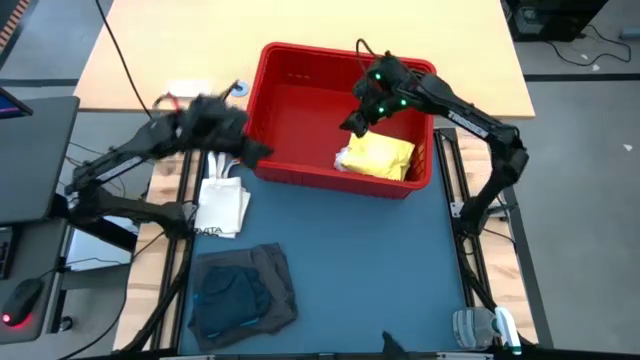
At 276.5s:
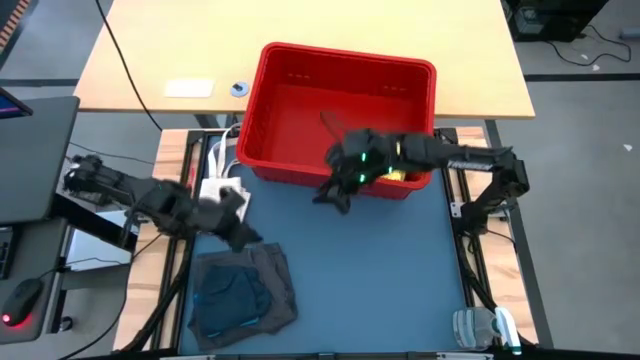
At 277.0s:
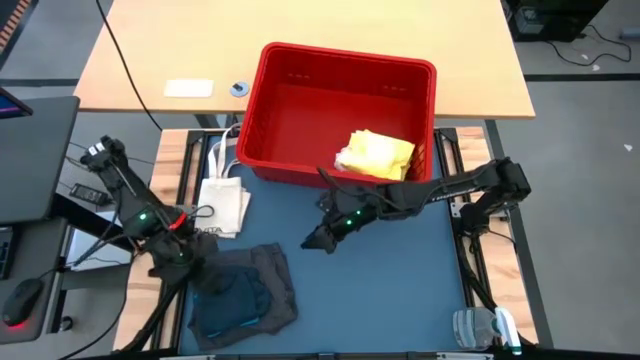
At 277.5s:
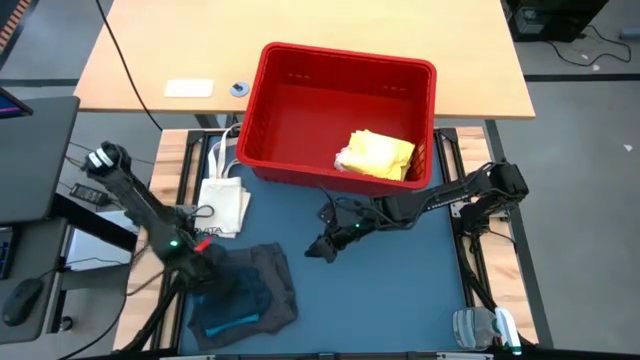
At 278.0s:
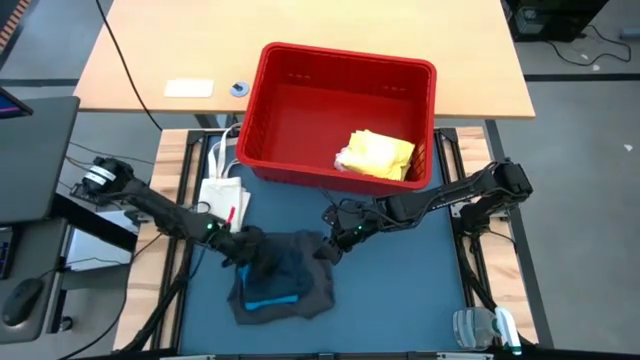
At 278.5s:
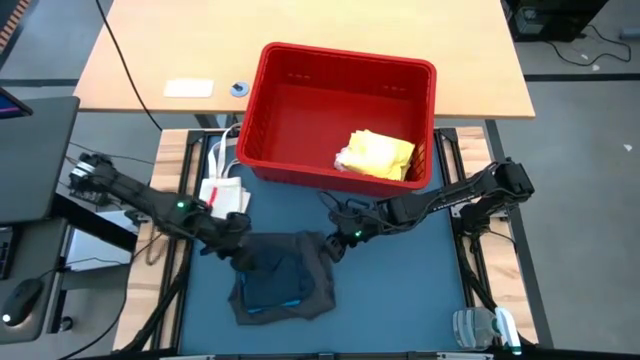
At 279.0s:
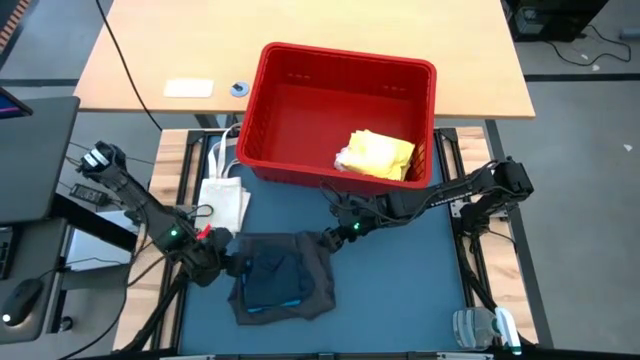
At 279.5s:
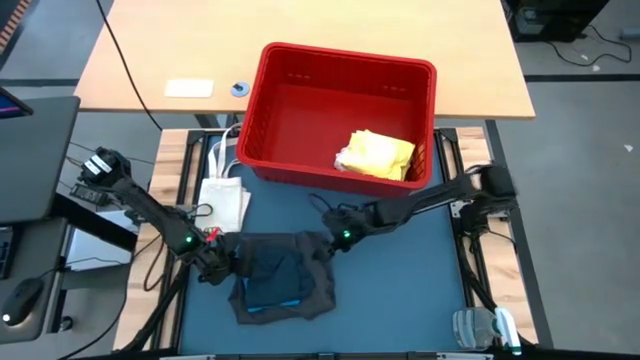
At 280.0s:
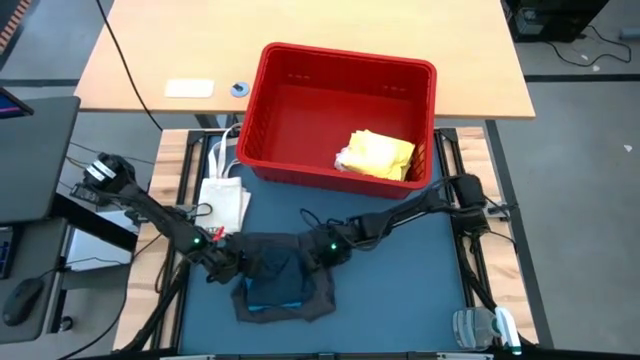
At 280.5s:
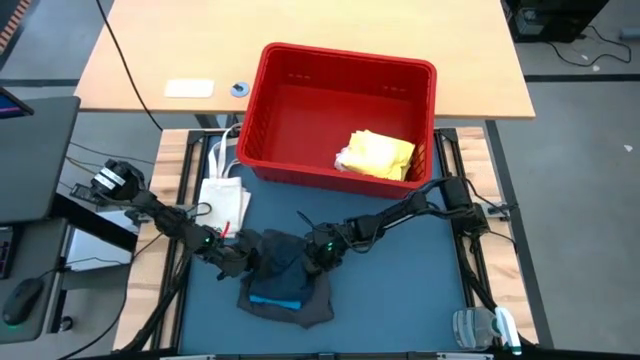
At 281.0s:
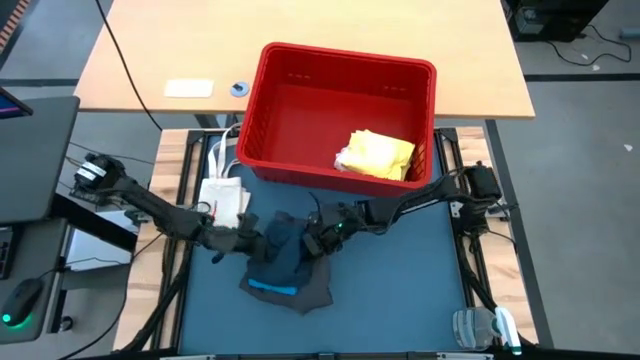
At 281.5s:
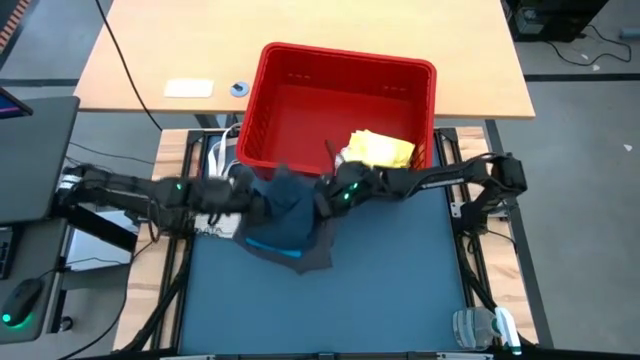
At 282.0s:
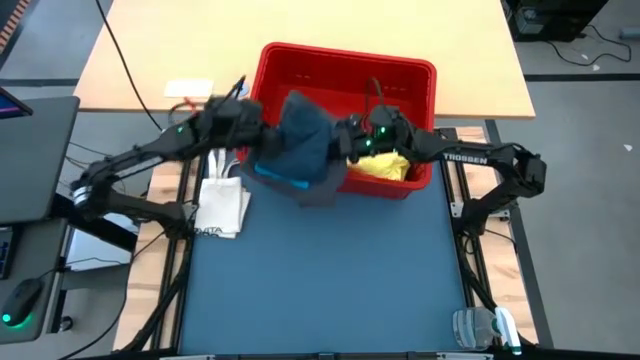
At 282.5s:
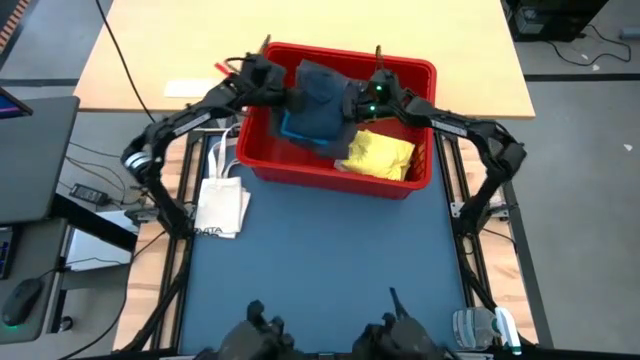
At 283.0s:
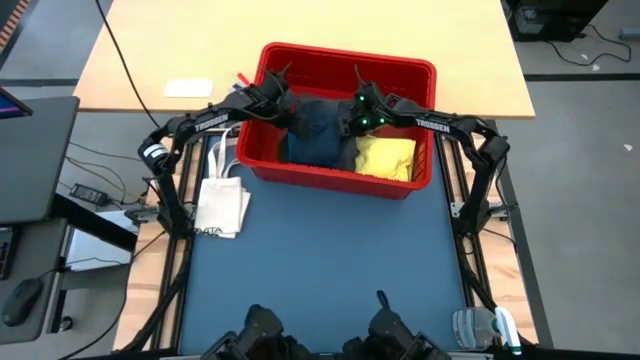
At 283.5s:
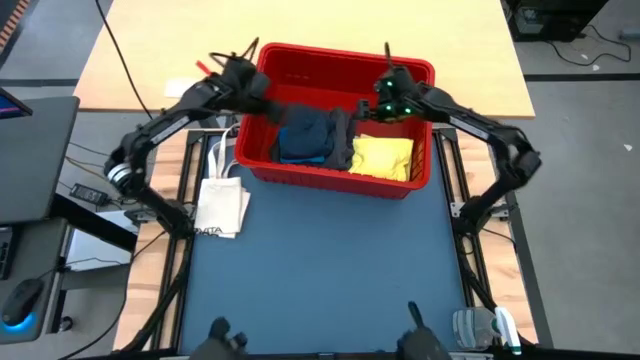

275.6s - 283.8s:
Task: Fold laundry
Put the folded shorts into the red bin

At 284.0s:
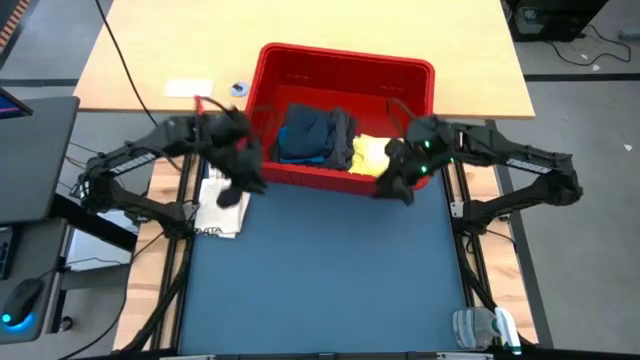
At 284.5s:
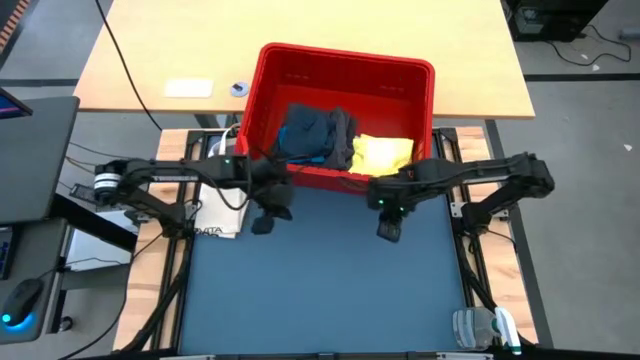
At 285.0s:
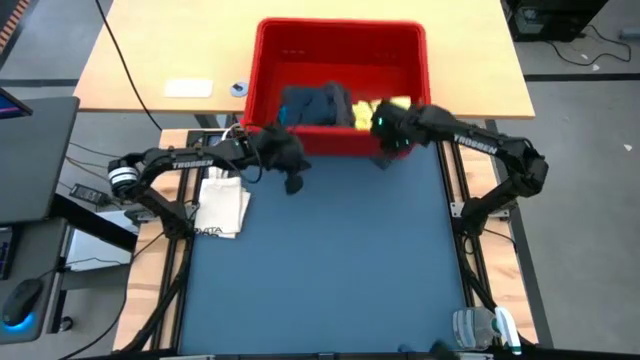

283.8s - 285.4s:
Adjust the red bin

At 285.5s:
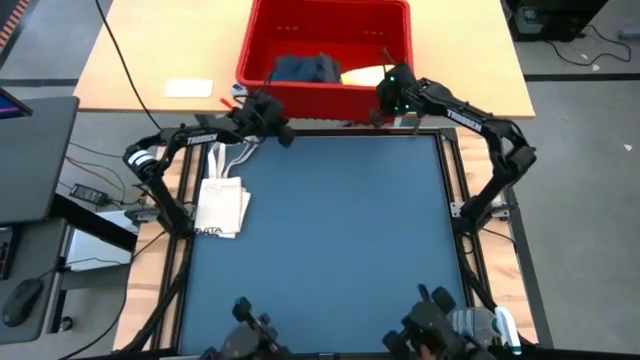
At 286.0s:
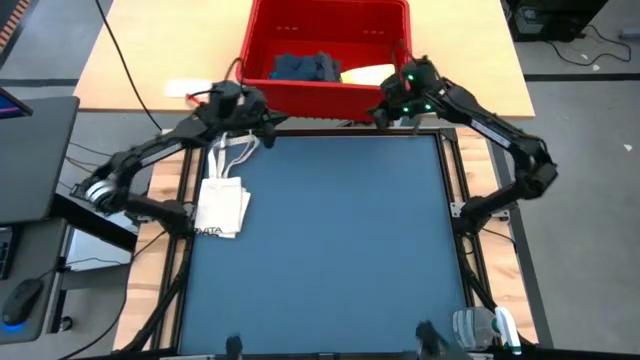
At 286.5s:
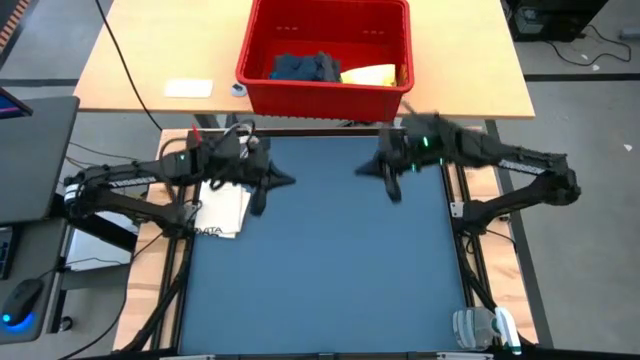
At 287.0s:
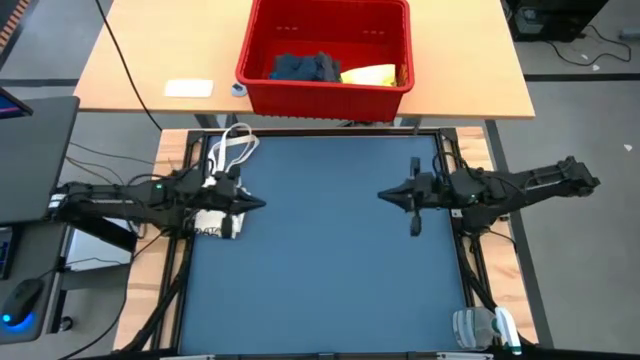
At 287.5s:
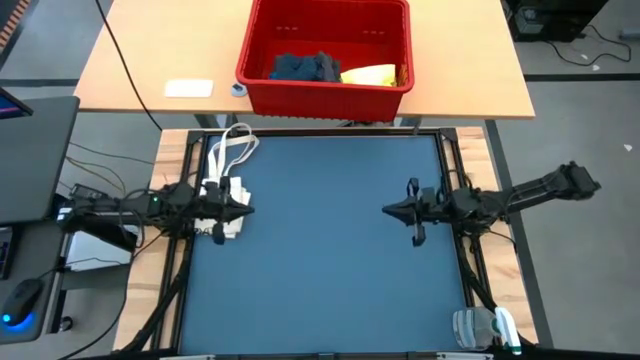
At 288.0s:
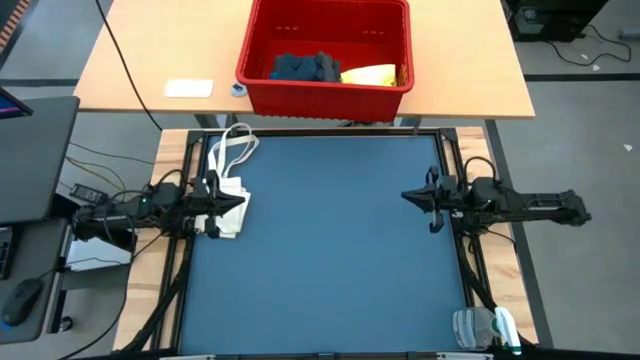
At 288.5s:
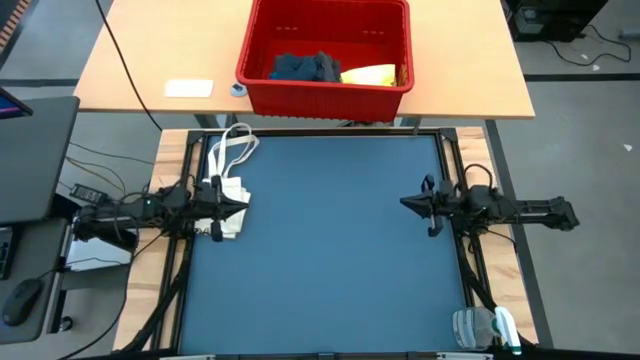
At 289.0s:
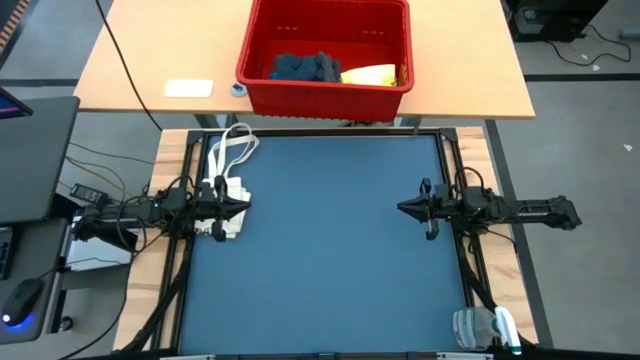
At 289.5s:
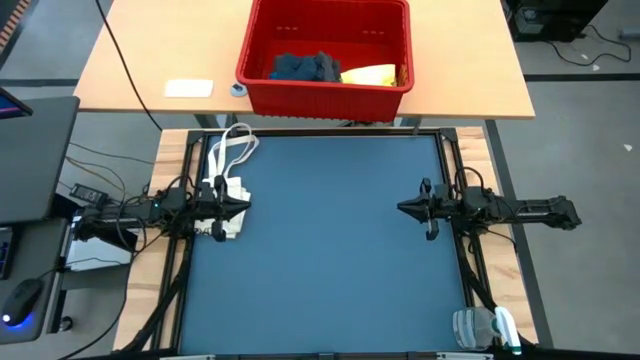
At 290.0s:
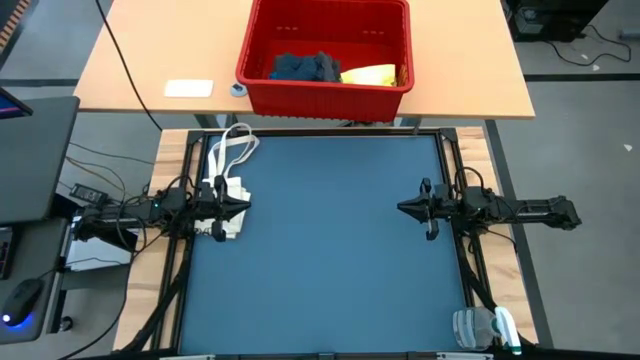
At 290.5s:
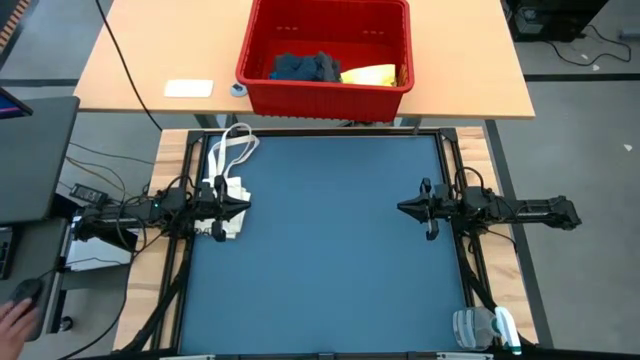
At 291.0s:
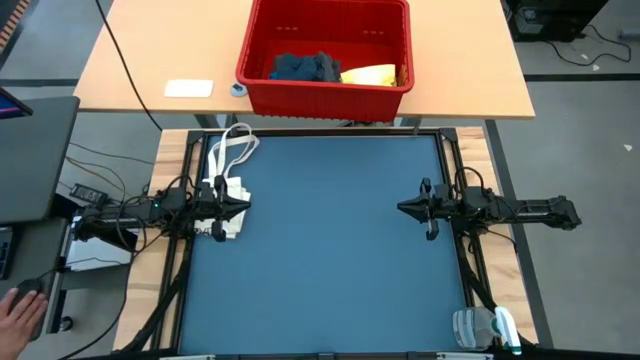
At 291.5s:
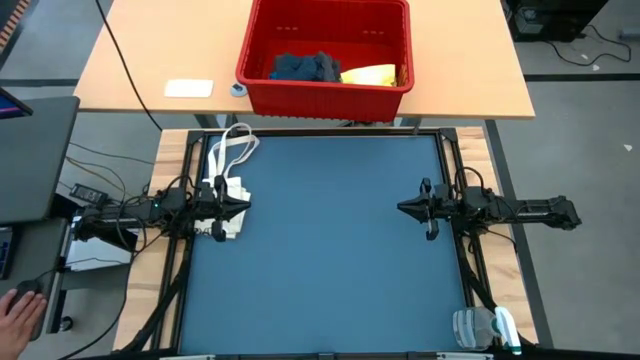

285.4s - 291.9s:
Return to Home Position

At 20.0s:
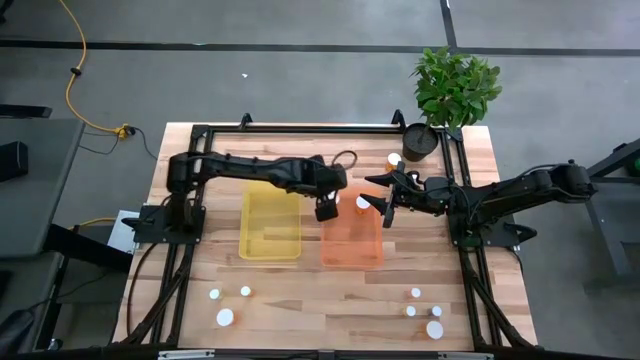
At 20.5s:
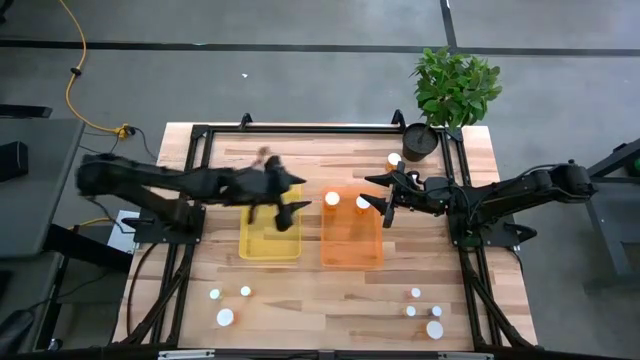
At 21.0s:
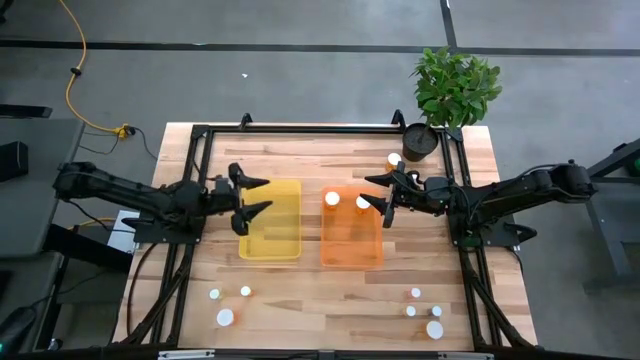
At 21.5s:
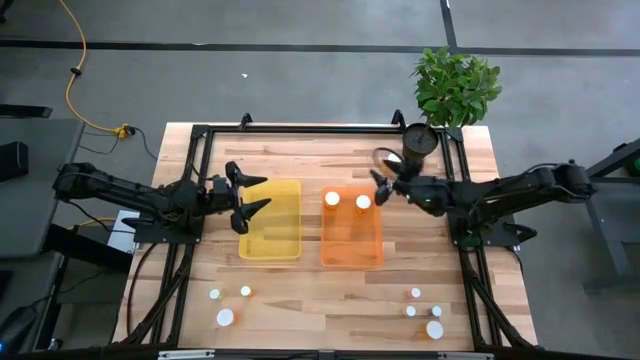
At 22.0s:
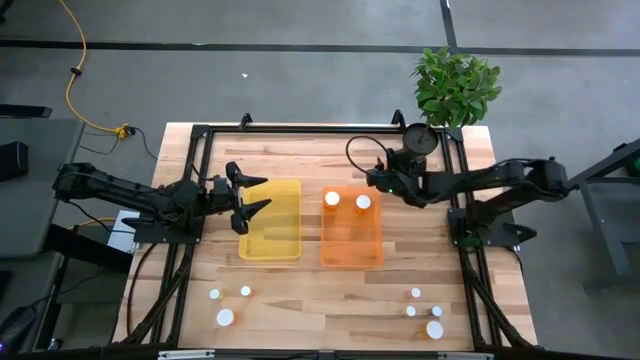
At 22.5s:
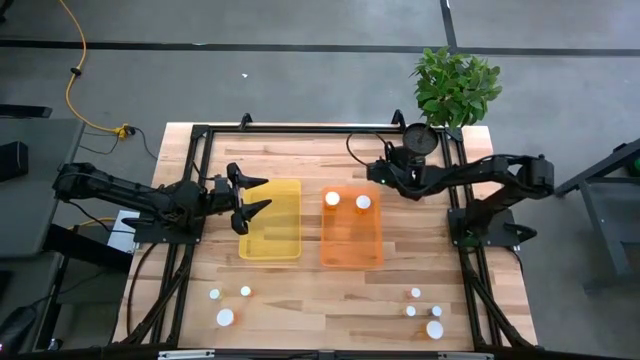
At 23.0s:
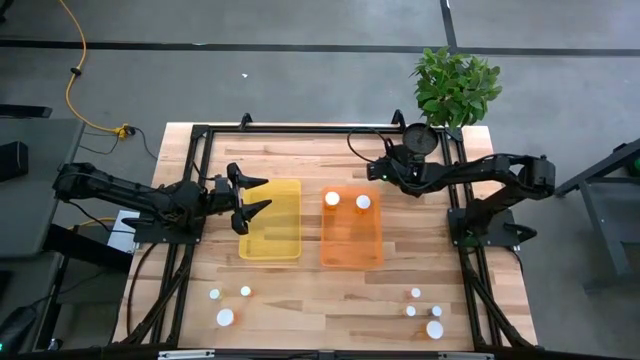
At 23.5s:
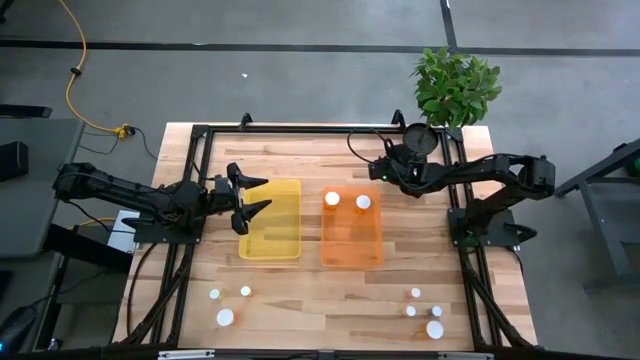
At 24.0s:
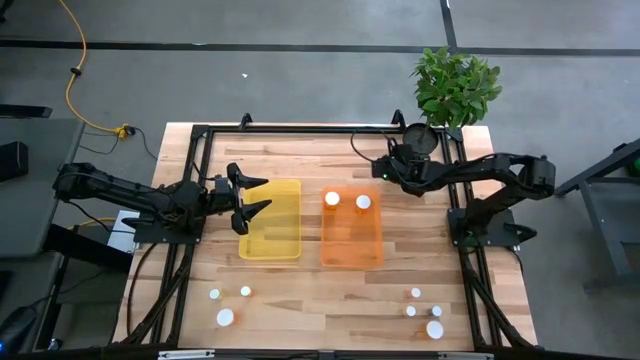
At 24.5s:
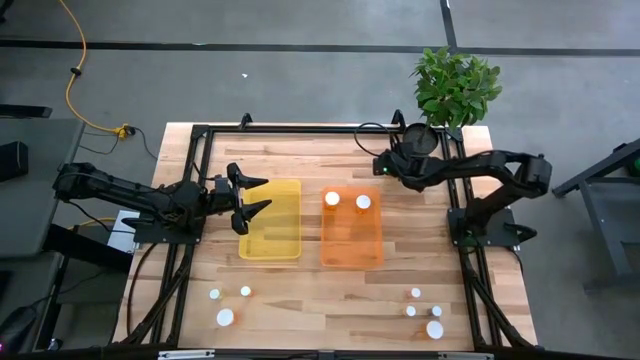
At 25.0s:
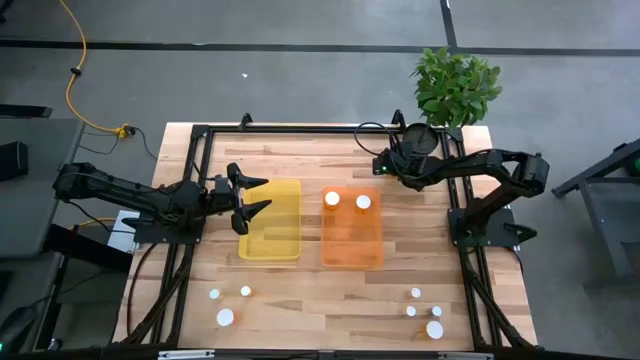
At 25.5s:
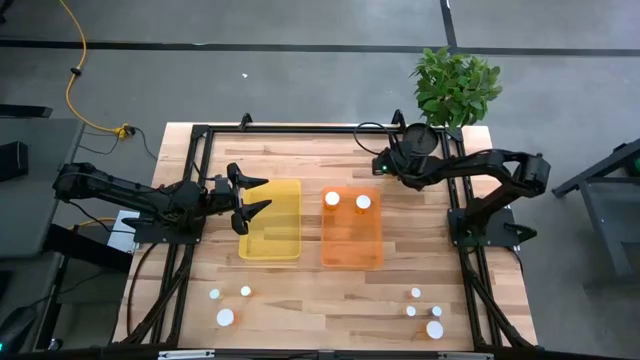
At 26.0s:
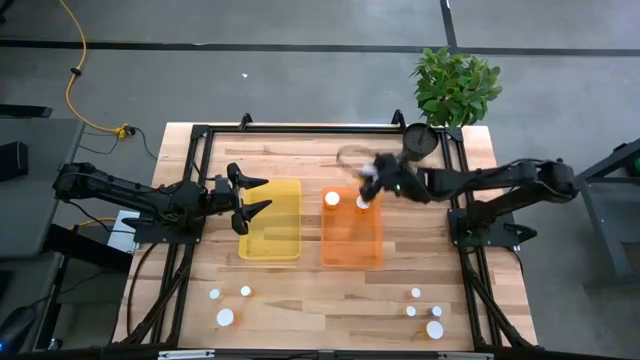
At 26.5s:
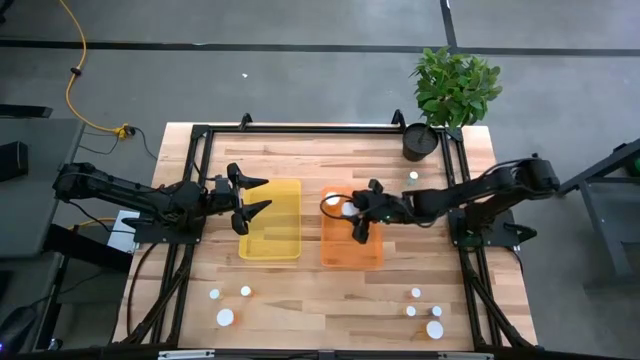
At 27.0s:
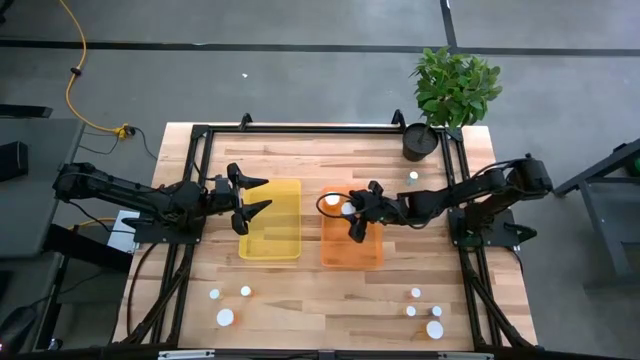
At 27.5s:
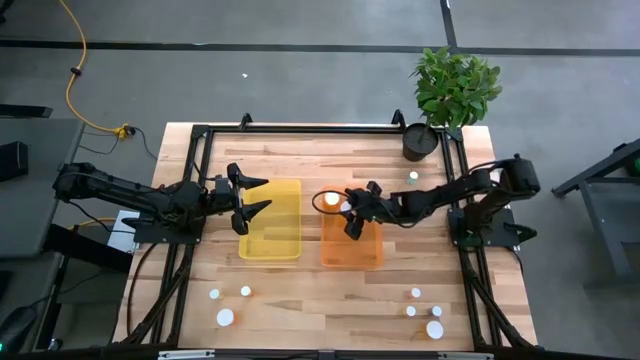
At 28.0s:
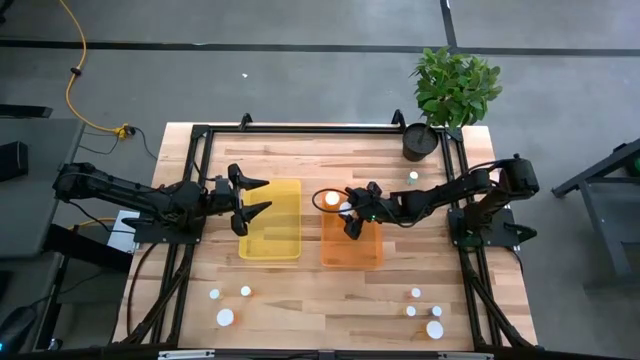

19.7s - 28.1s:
Task: Pick and place medicine bottles into bin by pill shape (circle, oval)
Put the orange capsule bottle into the orange bin
